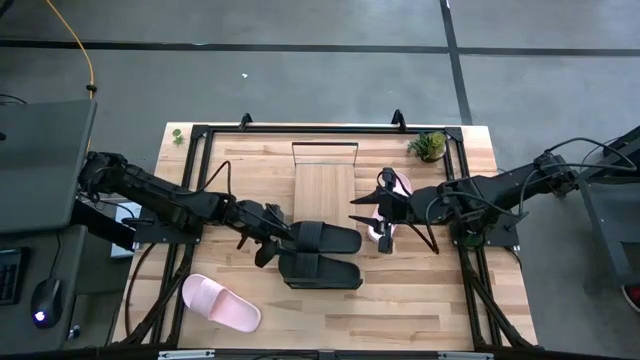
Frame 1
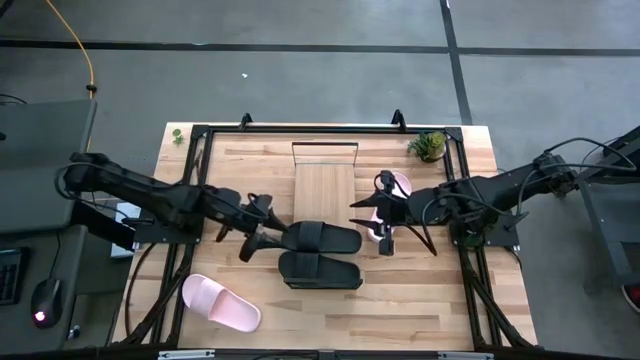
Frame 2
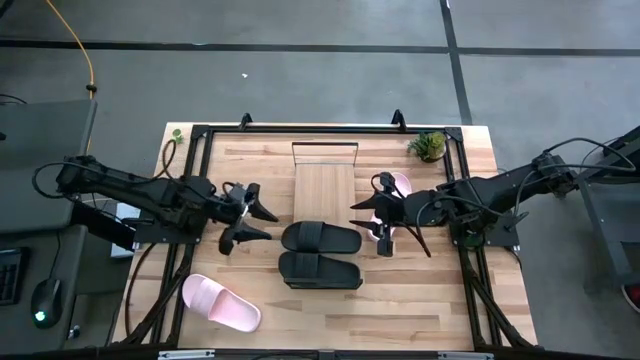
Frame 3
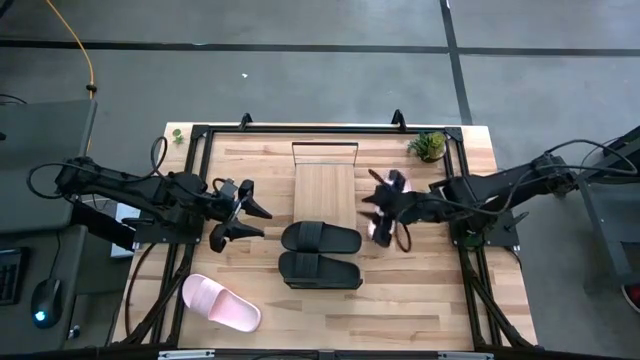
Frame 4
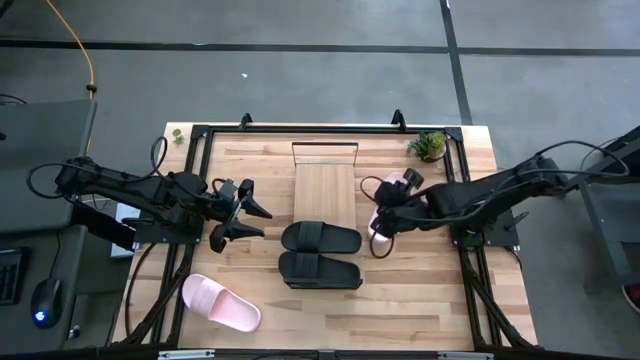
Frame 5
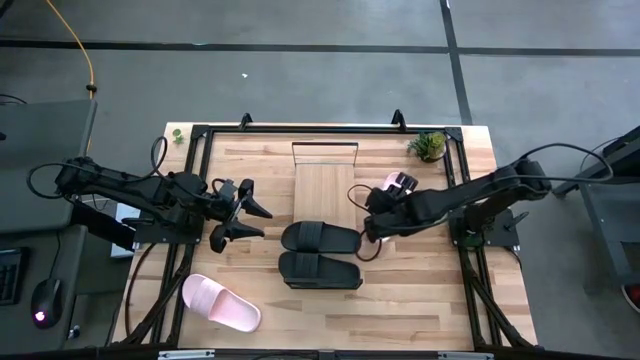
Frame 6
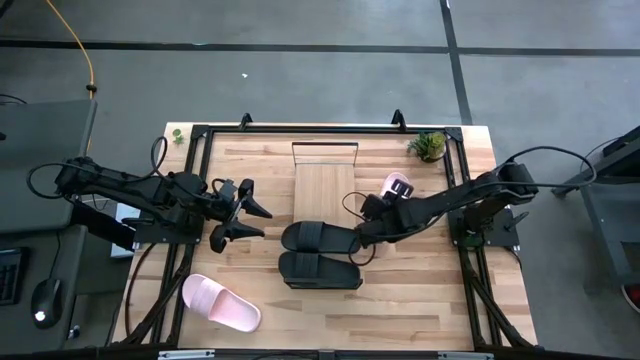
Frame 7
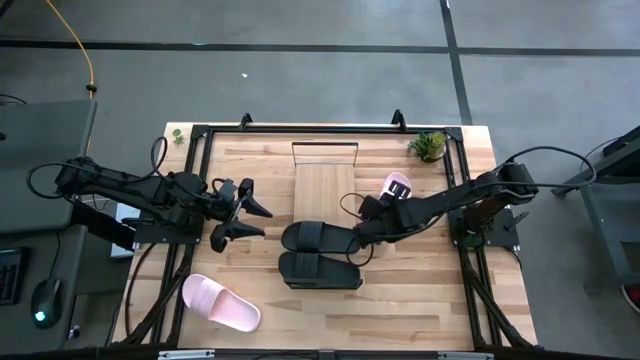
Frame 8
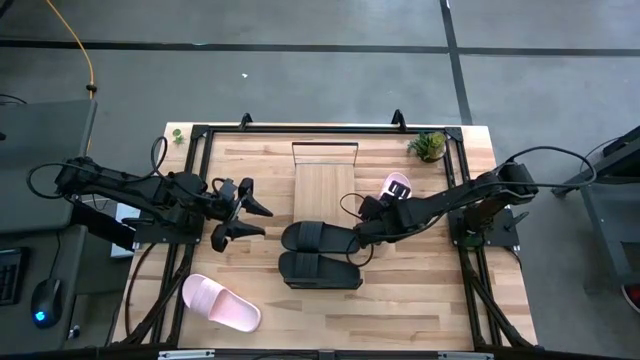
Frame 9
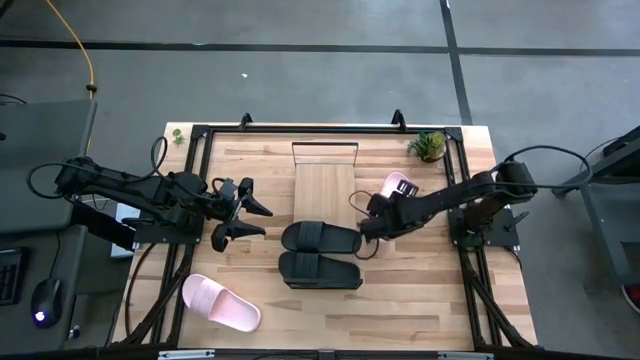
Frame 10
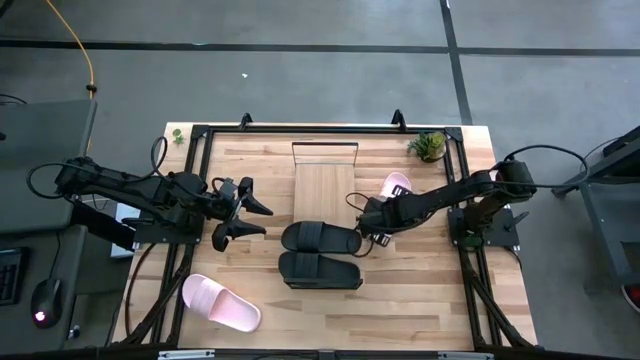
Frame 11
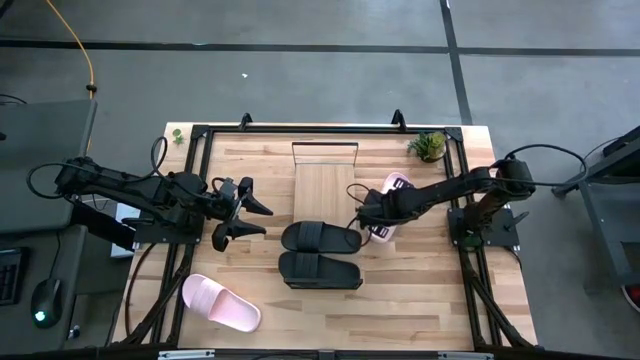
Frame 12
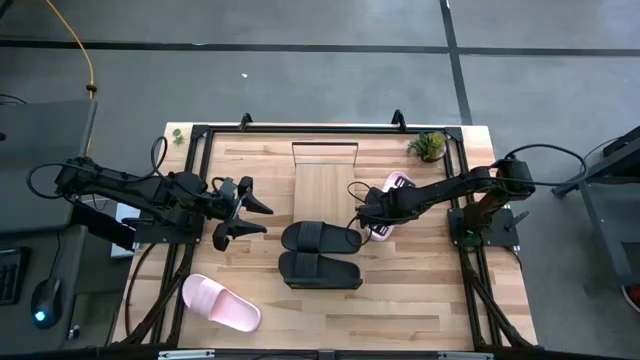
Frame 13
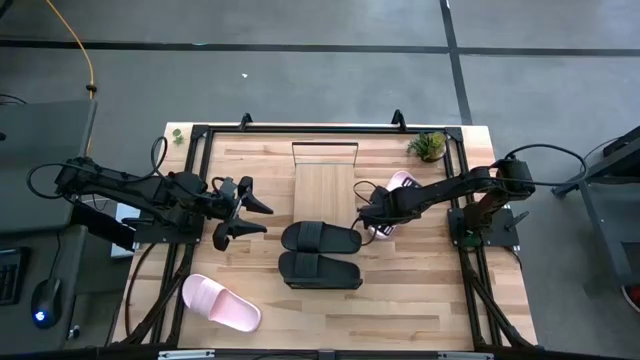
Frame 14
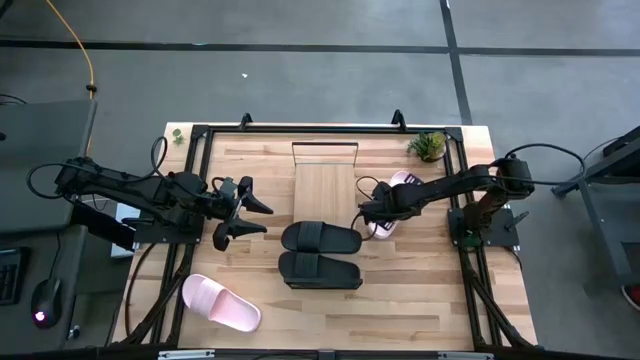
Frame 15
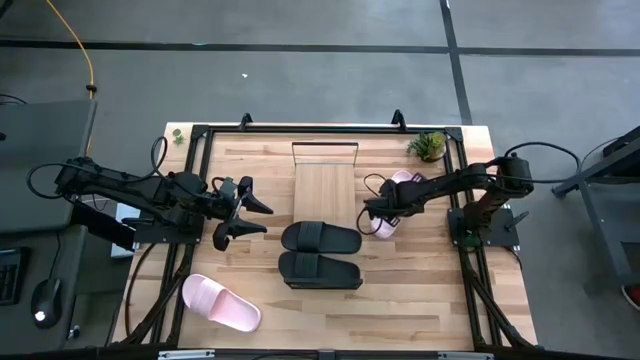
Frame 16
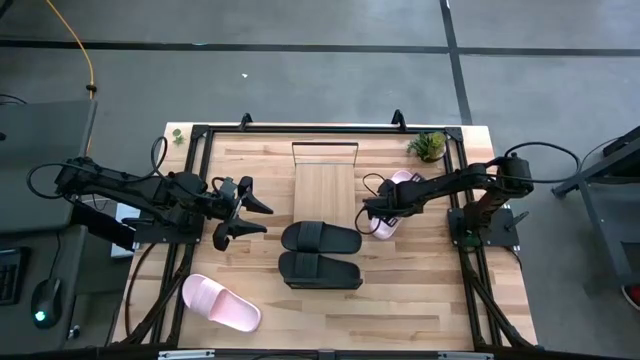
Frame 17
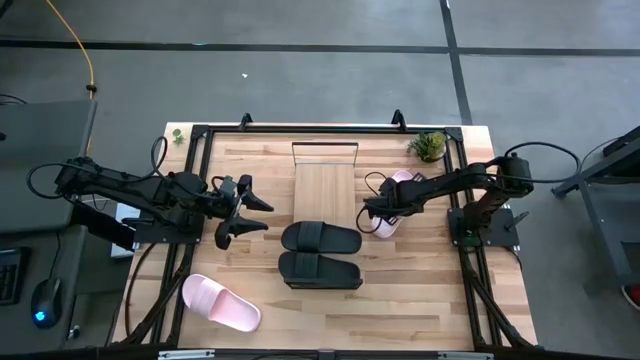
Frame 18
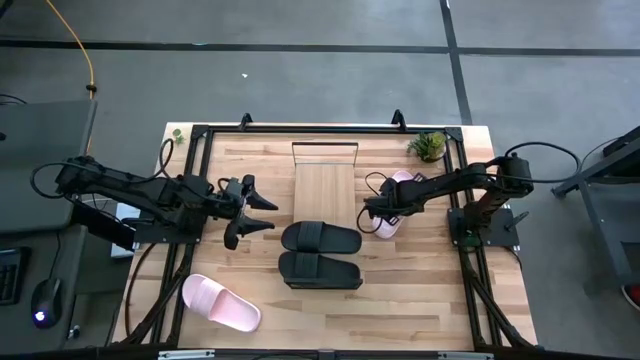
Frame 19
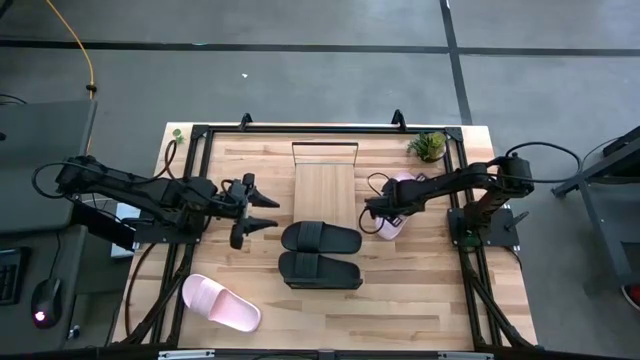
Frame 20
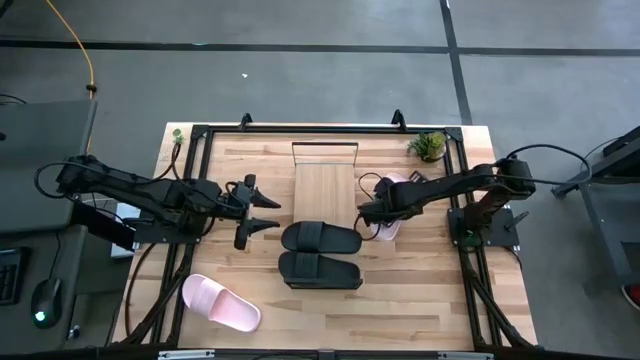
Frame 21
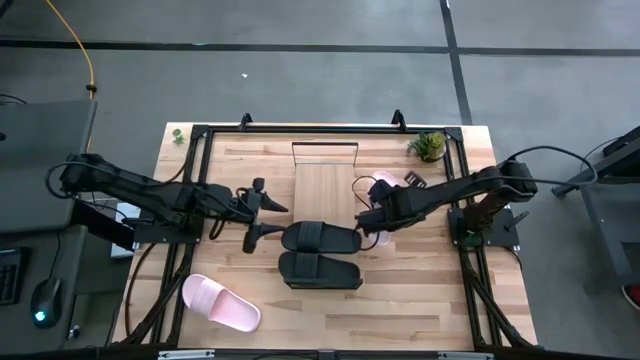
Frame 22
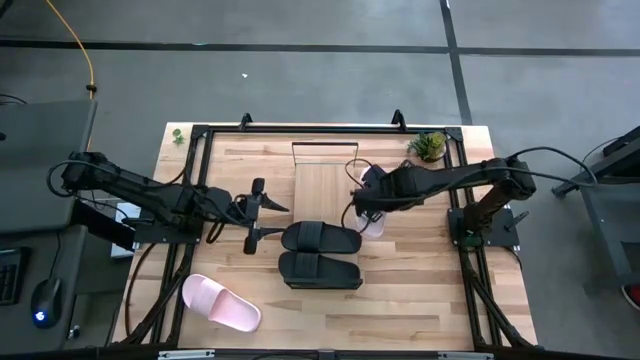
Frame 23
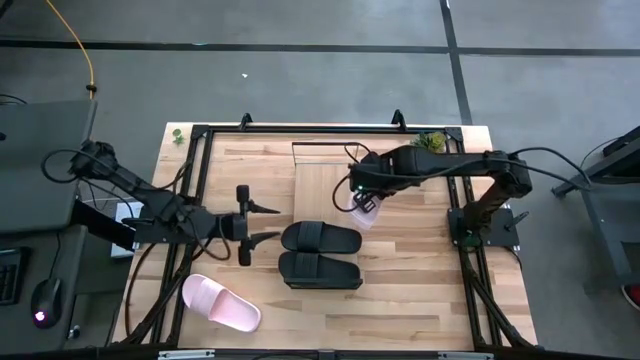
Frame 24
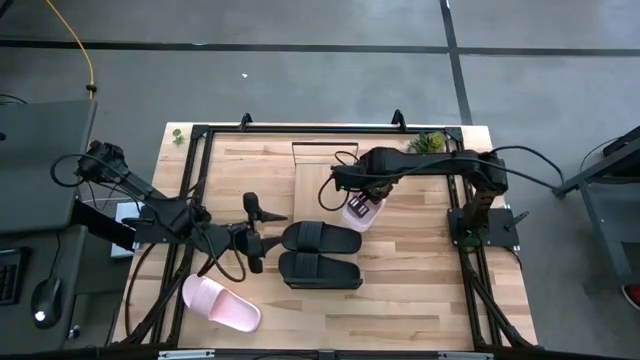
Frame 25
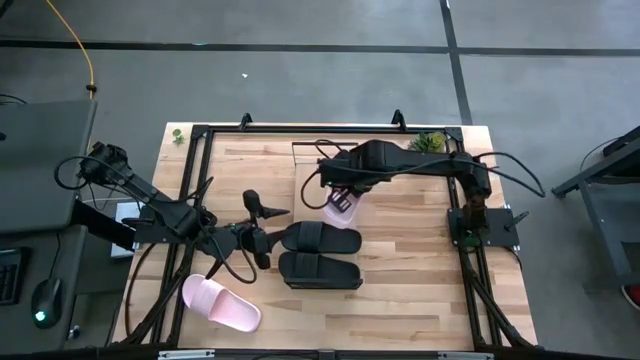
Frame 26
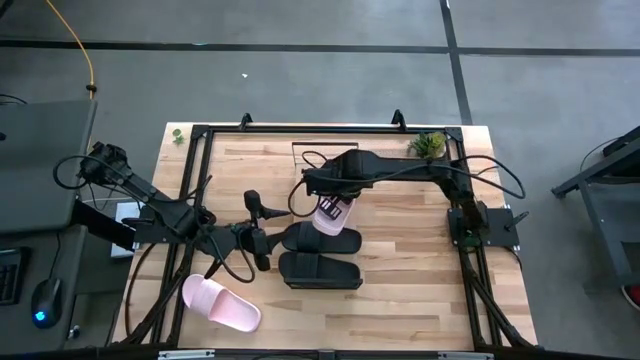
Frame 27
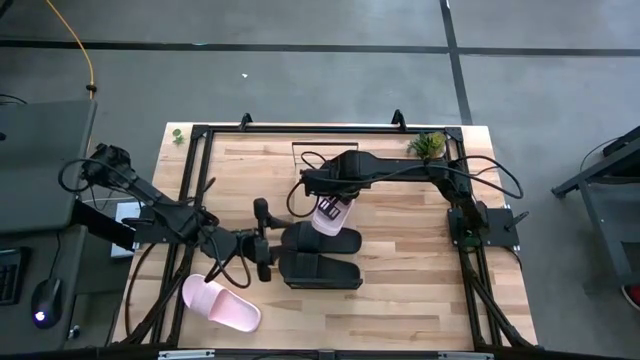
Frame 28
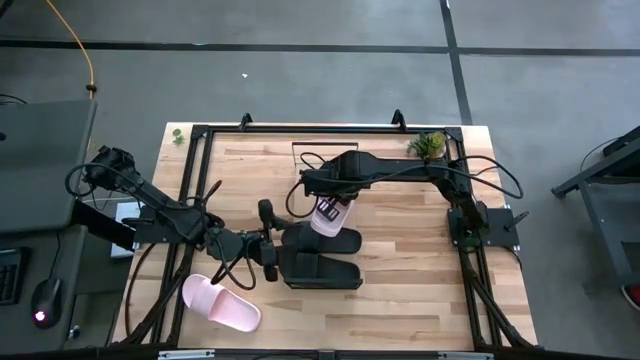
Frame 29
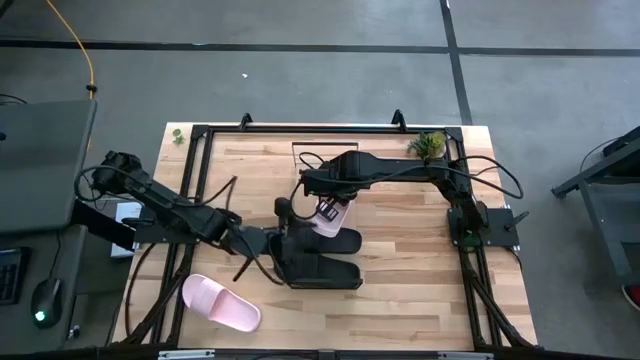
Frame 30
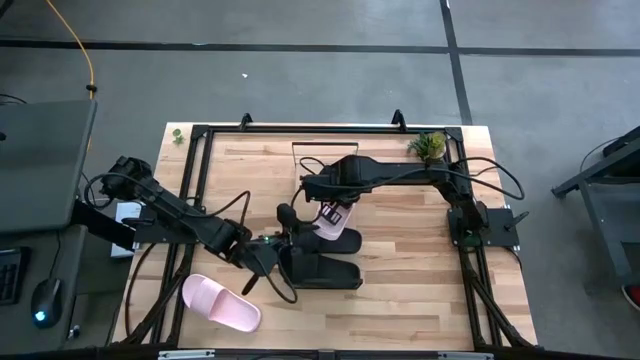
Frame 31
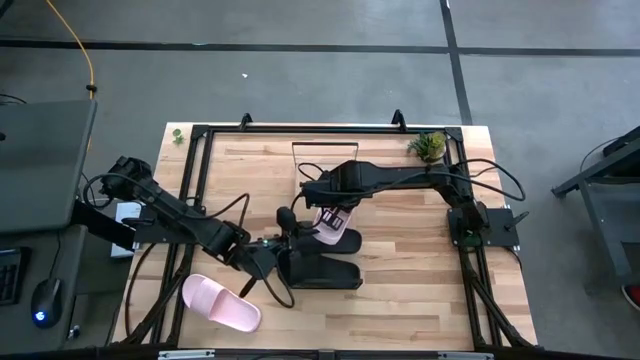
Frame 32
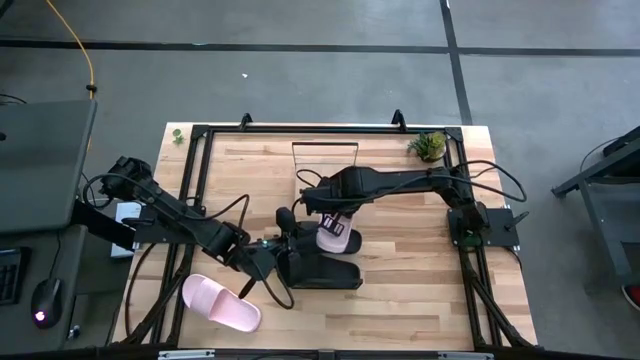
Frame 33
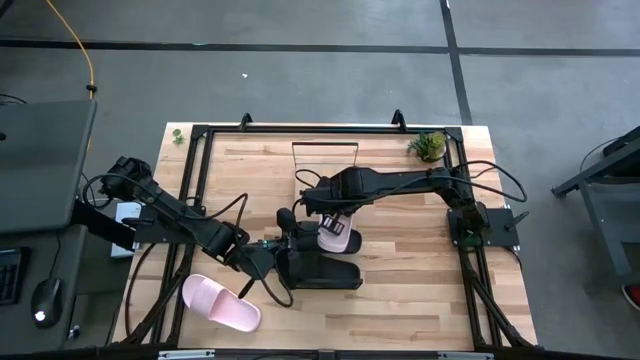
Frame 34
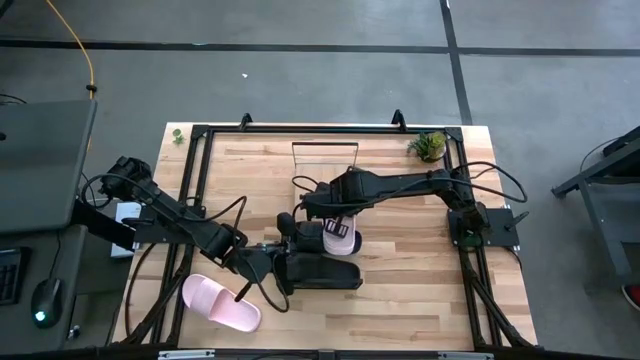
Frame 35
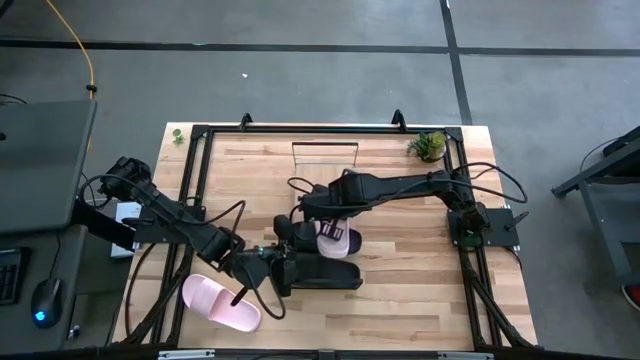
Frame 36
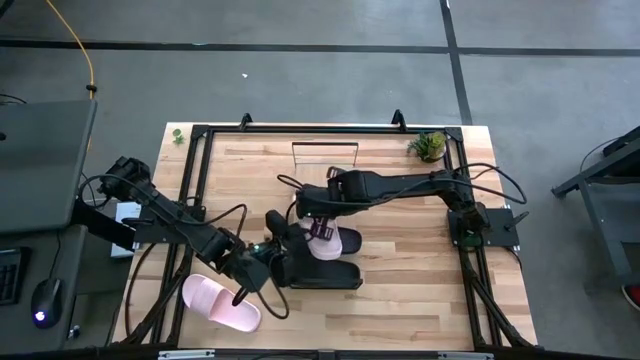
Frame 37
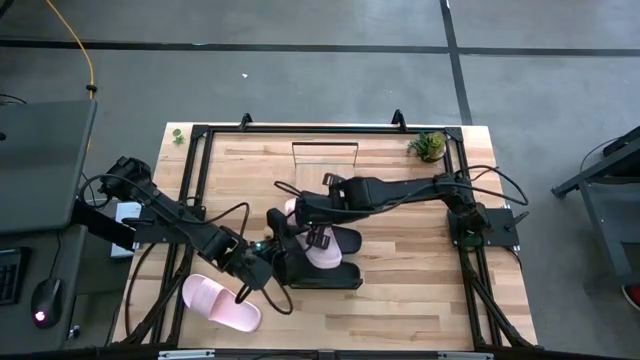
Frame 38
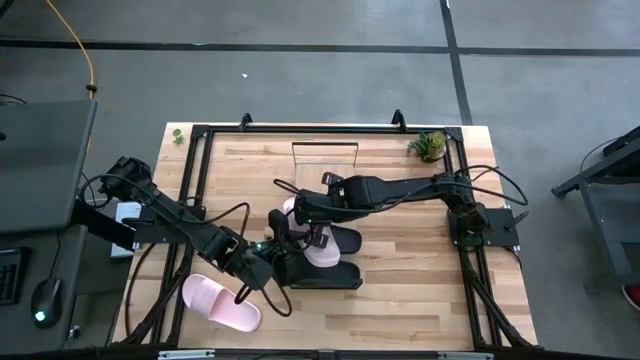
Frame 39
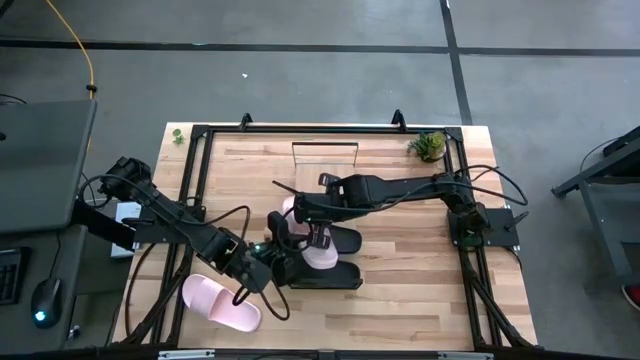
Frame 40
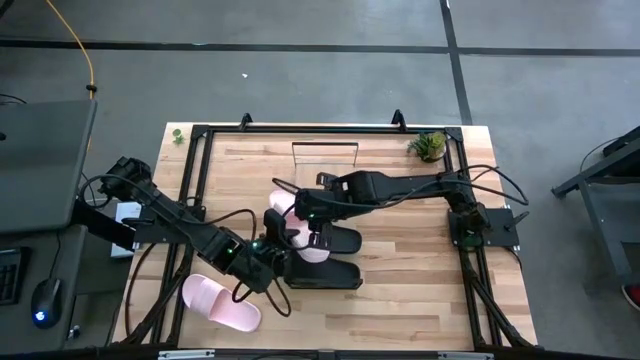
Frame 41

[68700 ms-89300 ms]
Task: Pick and place slides into the shelf
Put the top pink slipper on the shelf

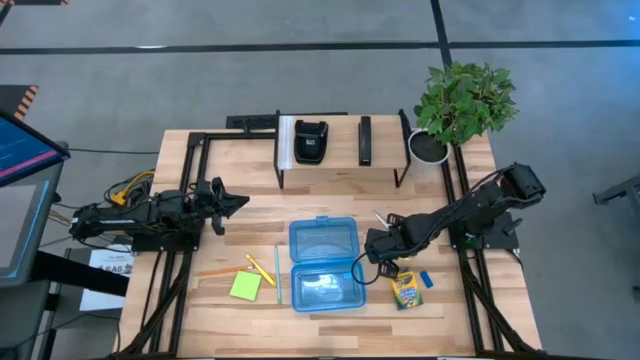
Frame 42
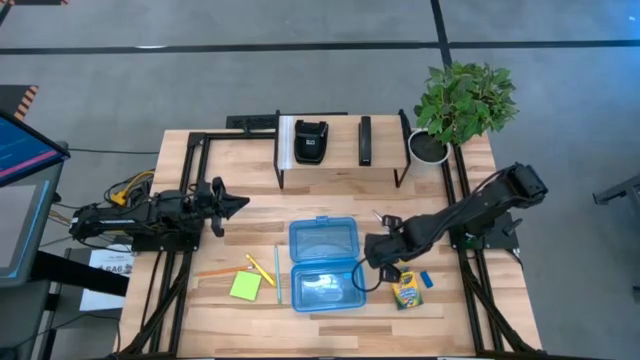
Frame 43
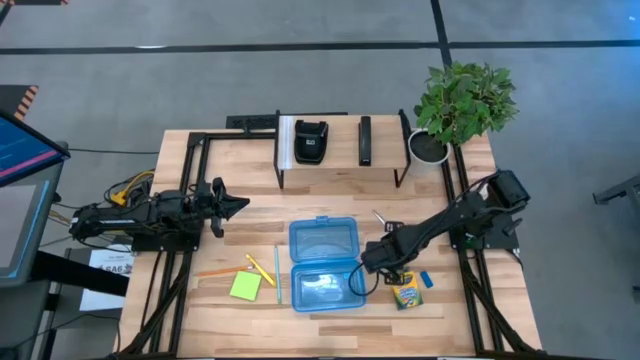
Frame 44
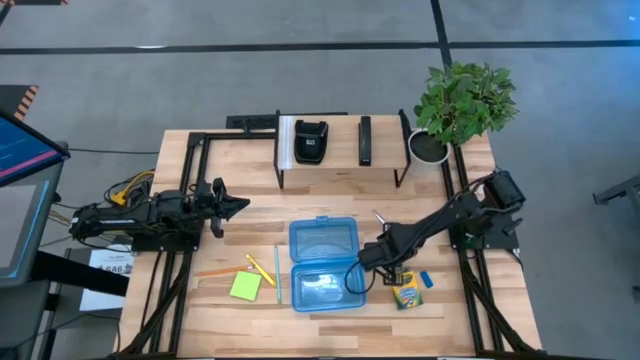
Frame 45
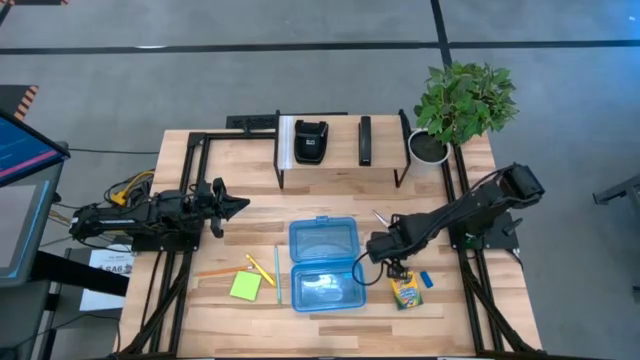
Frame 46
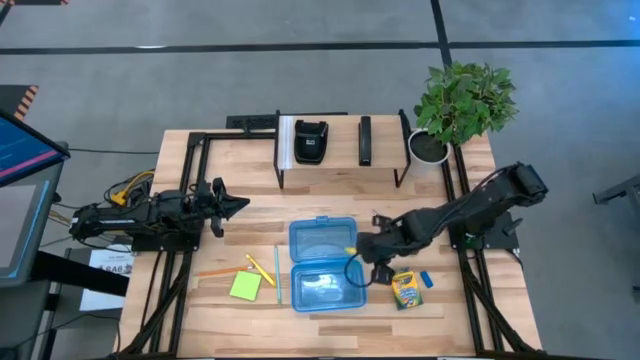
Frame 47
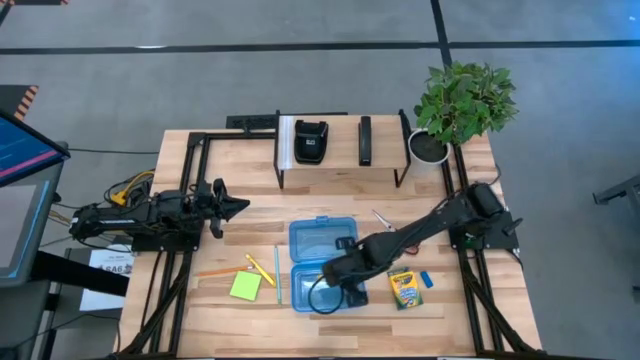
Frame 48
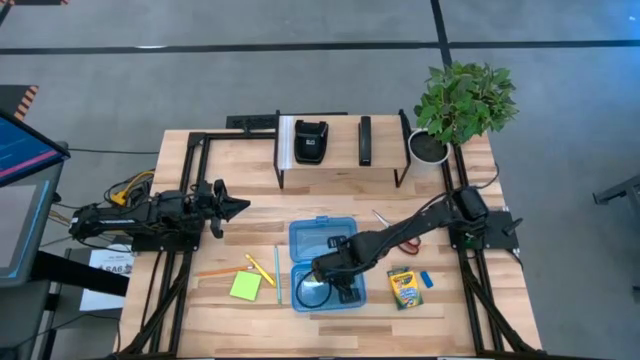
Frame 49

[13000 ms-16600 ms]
Task: Pack school essentials
Put the right yellow pen into the blue supply box
